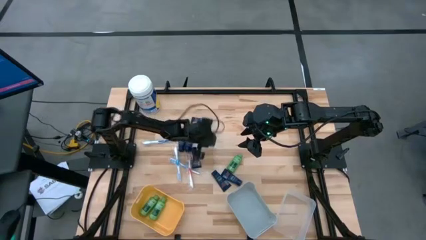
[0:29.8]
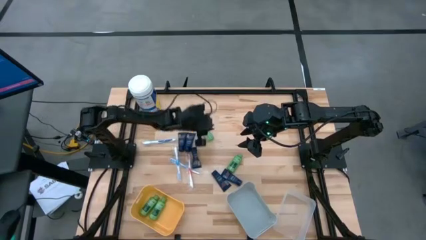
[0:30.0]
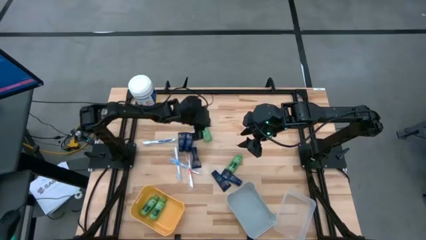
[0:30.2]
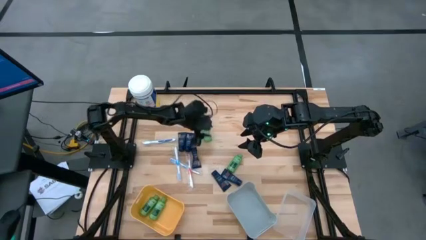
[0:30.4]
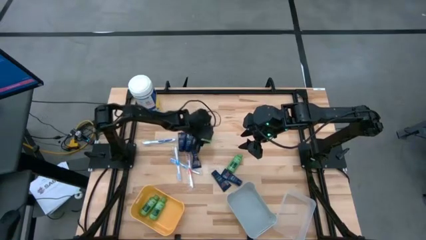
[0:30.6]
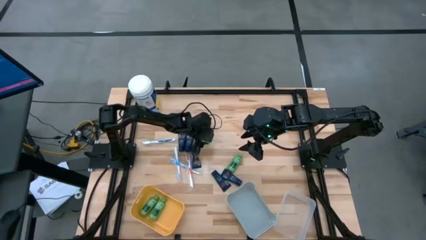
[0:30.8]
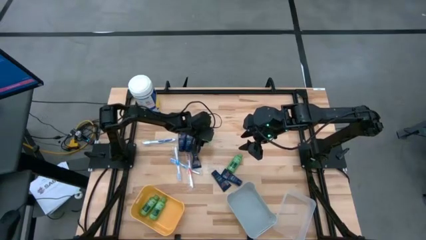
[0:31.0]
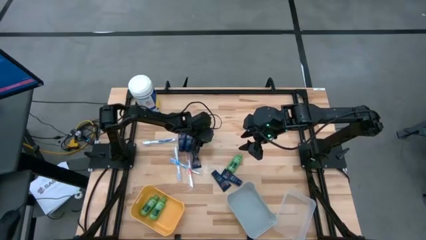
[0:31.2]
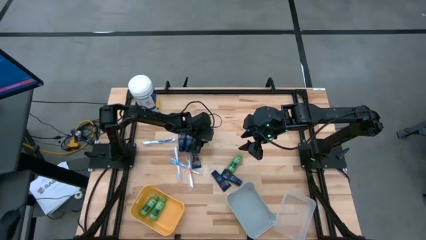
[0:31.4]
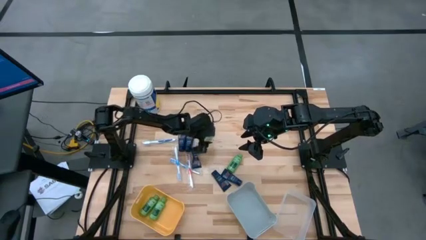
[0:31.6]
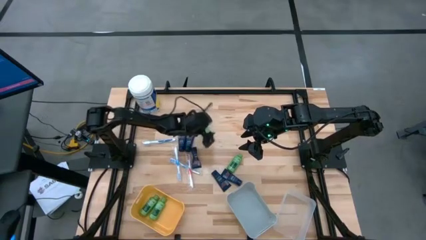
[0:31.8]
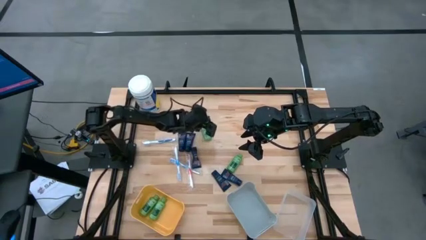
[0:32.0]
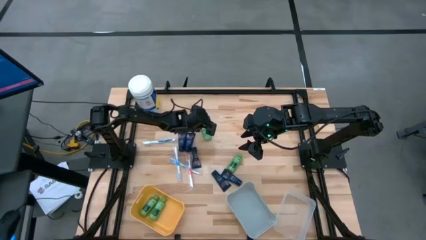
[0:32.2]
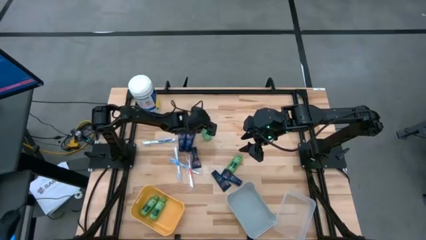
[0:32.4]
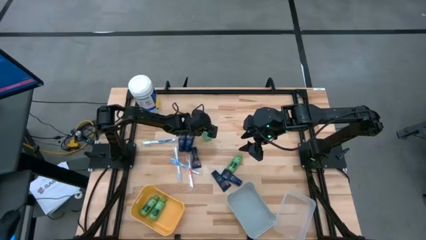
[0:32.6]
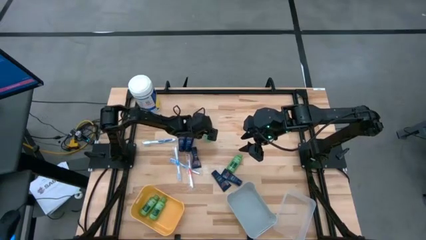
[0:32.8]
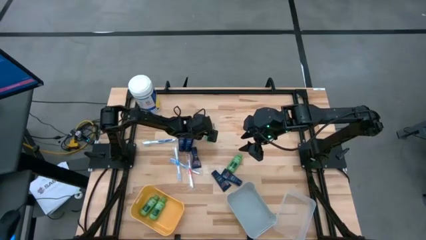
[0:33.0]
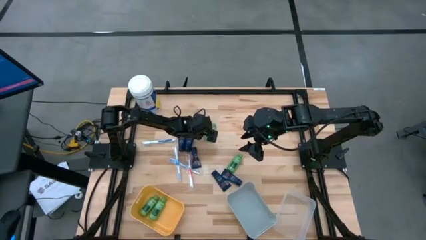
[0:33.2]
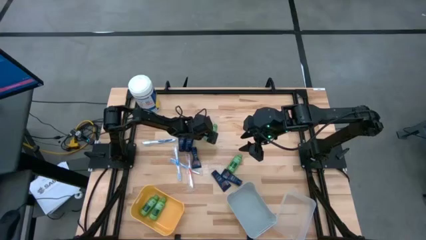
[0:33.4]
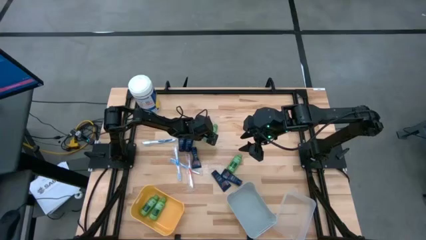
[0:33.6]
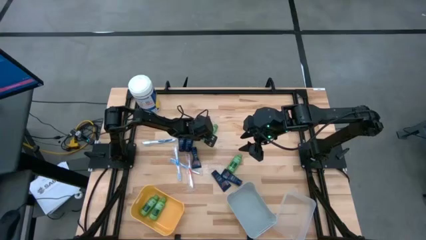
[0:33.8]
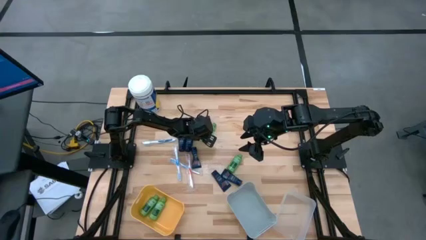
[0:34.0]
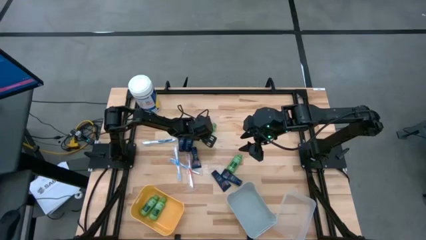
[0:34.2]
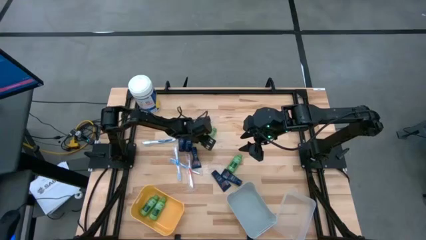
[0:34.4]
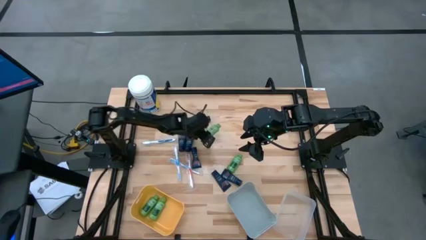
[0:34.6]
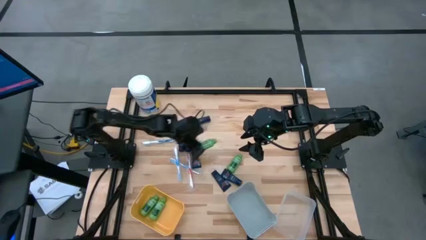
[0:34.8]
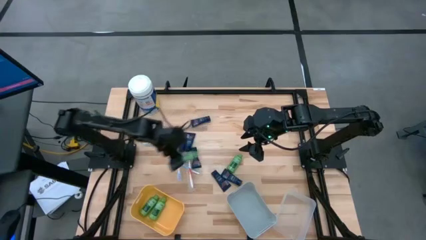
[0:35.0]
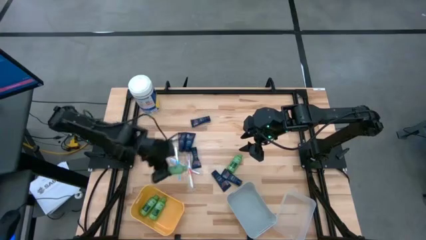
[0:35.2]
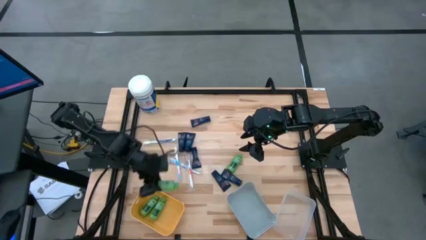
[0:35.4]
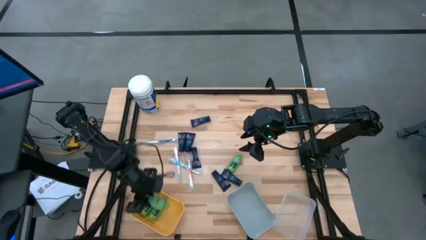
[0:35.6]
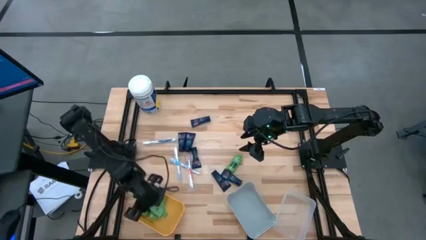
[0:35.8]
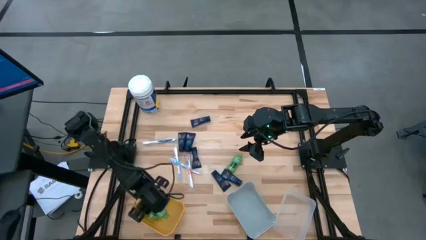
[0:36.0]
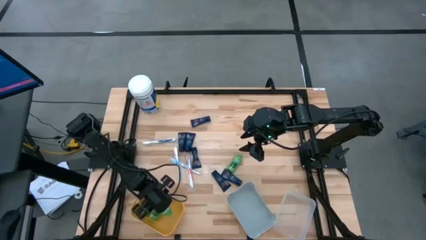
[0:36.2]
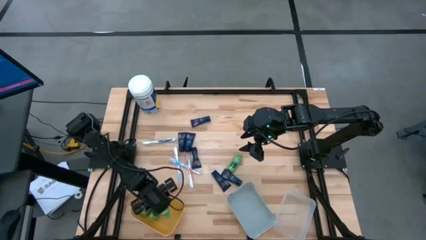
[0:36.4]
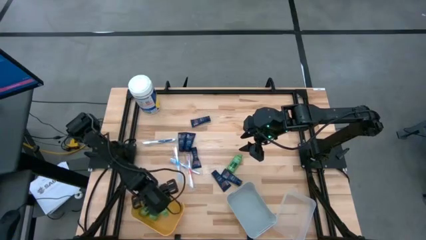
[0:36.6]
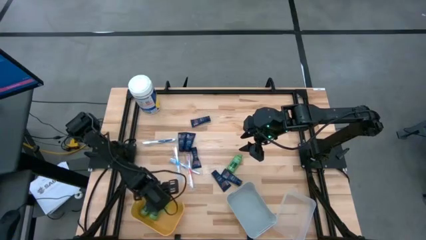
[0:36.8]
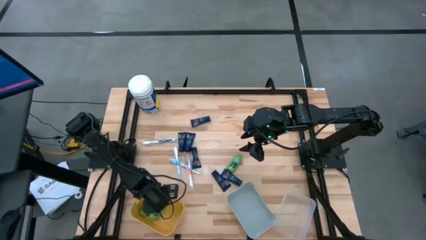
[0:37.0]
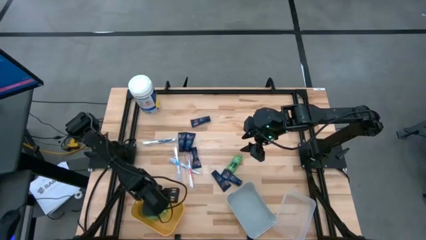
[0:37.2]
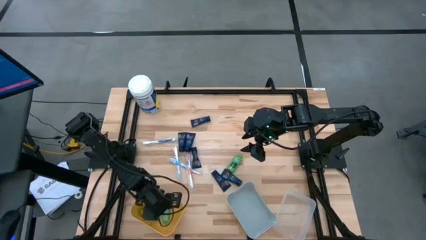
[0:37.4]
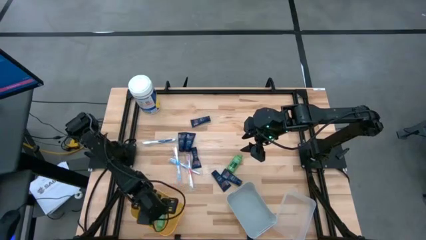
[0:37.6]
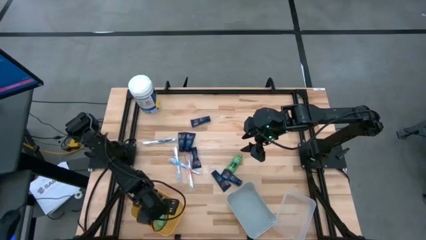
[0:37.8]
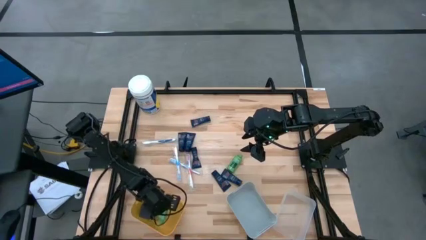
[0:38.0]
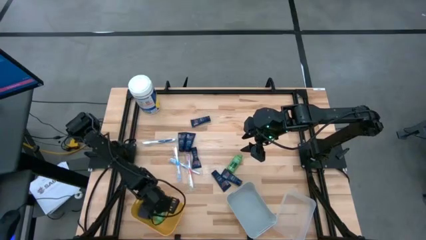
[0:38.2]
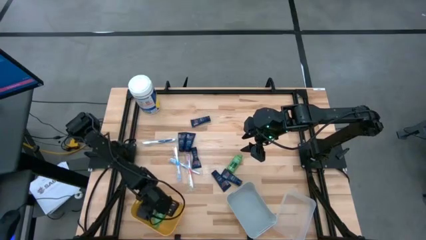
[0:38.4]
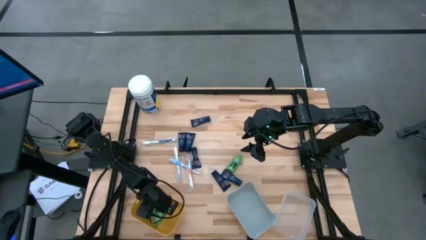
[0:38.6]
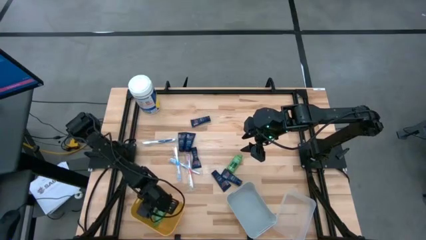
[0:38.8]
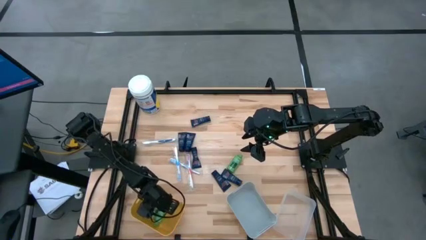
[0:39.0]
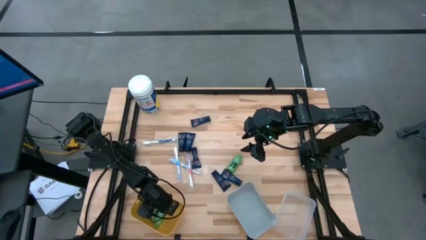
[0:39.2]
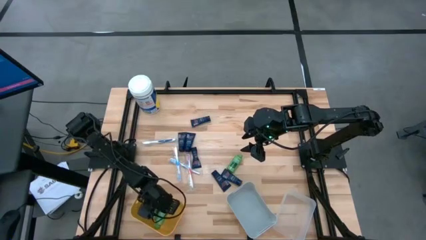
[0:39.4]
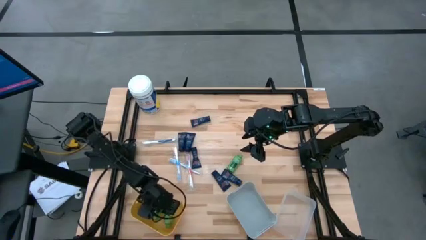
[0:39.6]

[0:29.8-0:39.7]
Task: Pick & Place Travel size toiletries
Put the green shampoo into the yellow bin

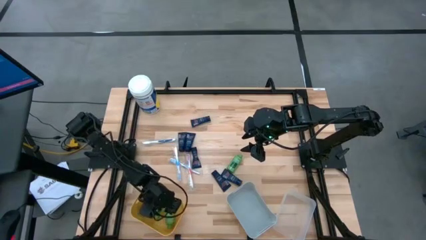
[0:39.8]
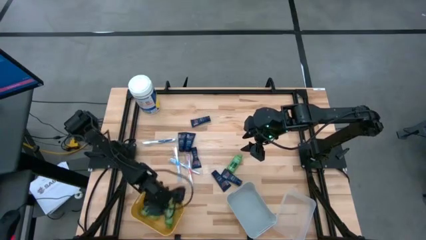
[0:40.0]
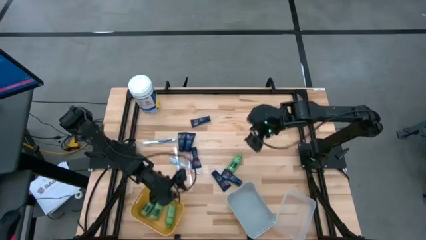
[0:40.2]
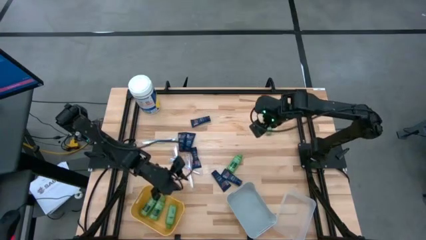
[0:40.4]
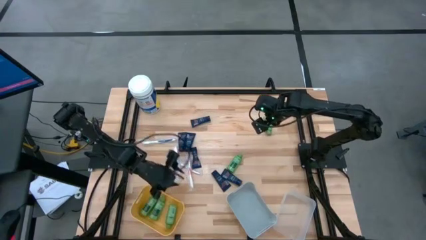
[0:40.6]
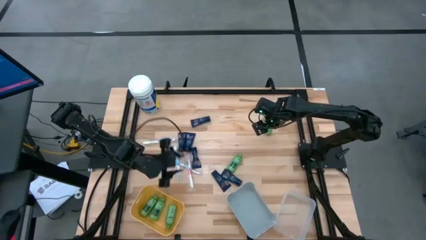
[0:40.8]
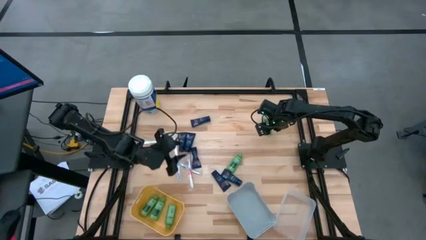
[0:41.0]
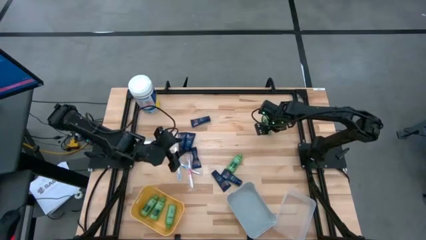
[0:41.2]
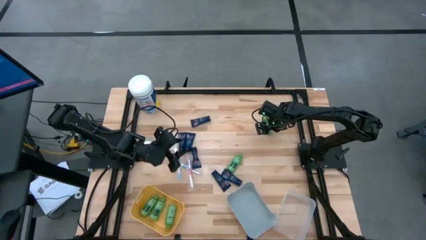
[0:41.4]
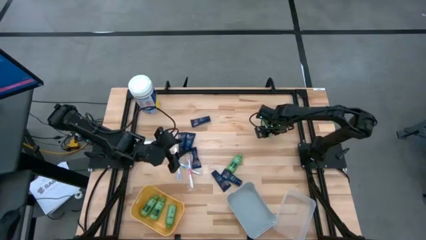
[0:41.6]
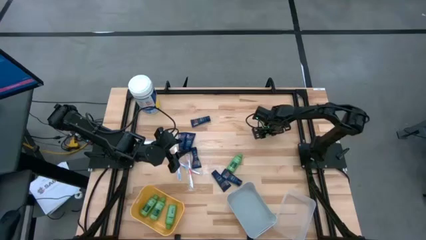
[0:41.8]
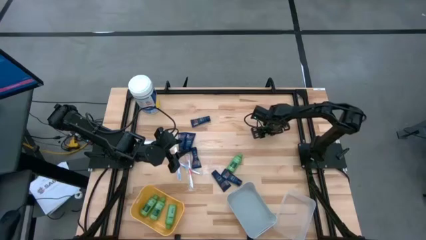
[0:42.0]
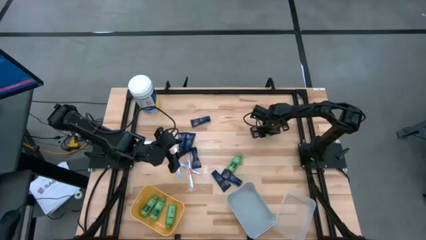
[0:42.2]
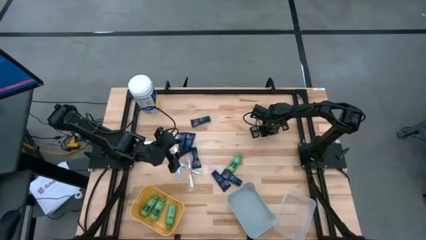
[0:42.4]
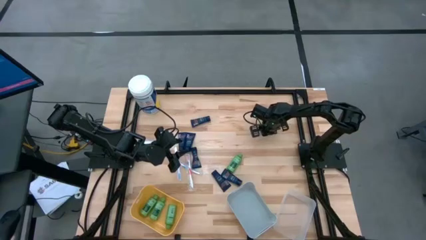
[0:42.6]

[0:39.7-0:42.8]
Put the green shampoo into the yellow bin

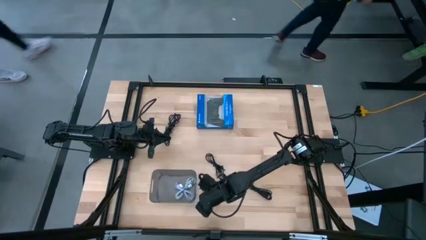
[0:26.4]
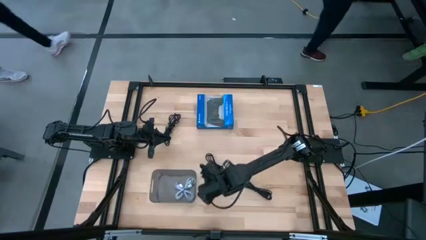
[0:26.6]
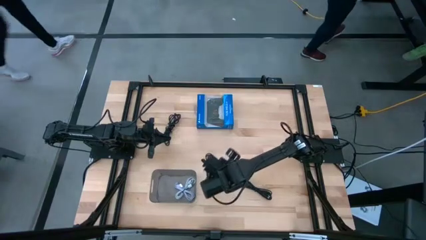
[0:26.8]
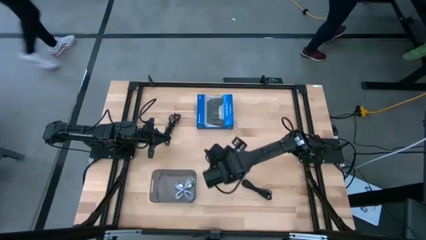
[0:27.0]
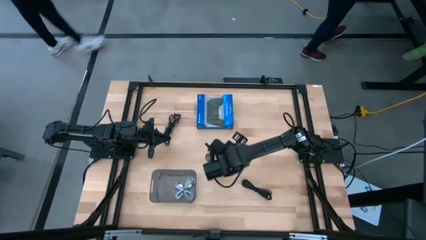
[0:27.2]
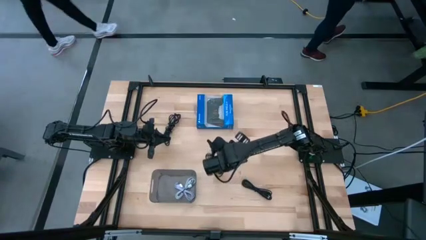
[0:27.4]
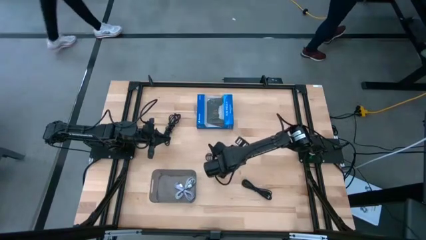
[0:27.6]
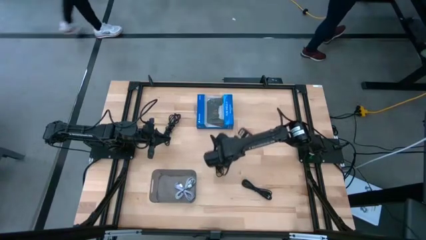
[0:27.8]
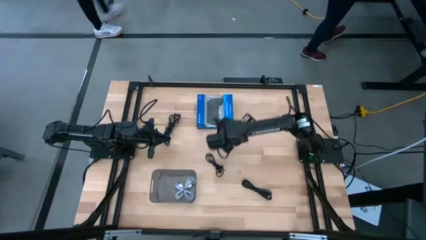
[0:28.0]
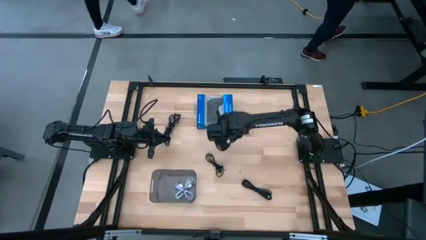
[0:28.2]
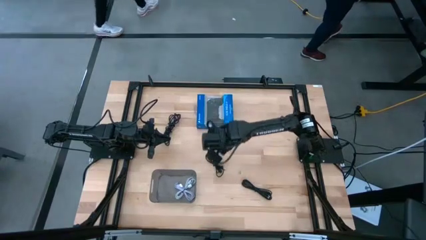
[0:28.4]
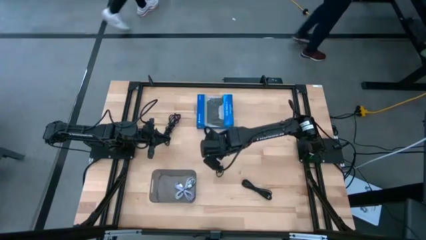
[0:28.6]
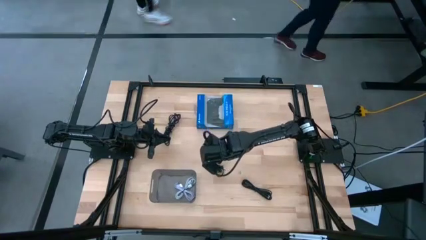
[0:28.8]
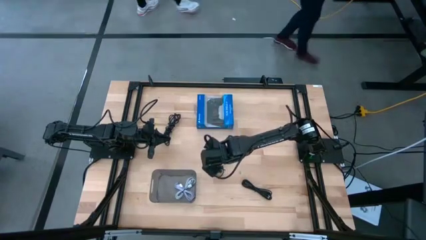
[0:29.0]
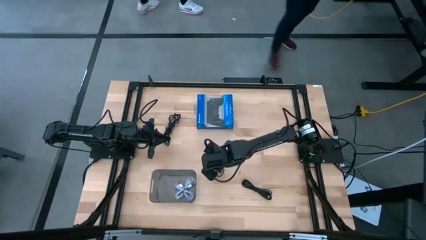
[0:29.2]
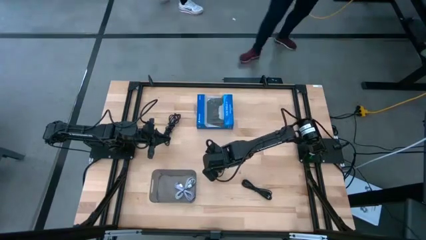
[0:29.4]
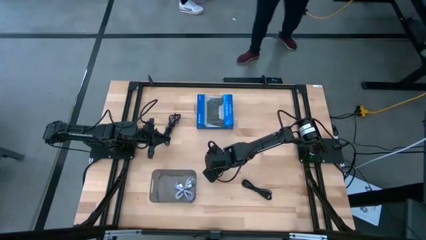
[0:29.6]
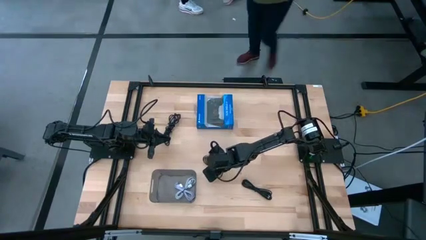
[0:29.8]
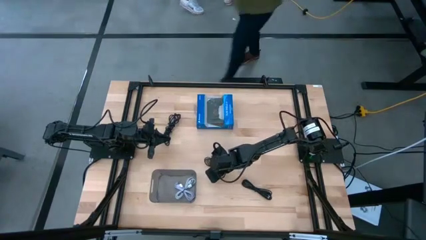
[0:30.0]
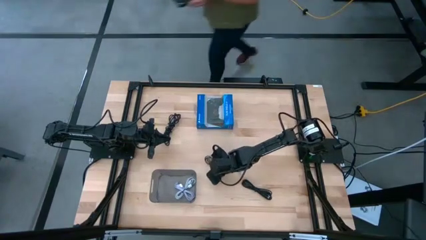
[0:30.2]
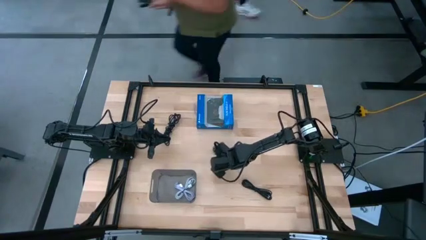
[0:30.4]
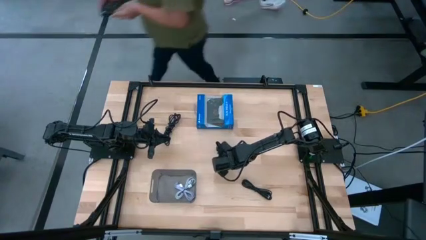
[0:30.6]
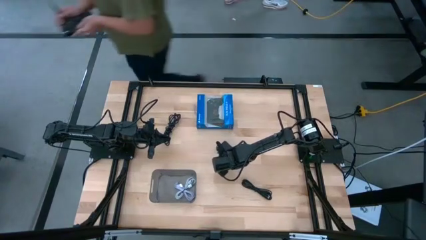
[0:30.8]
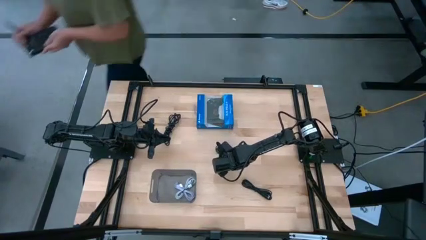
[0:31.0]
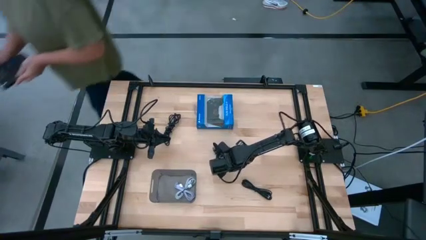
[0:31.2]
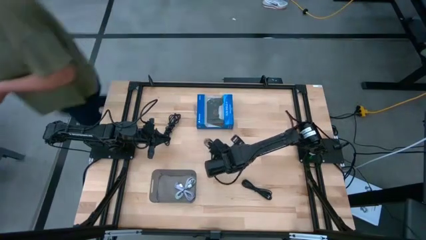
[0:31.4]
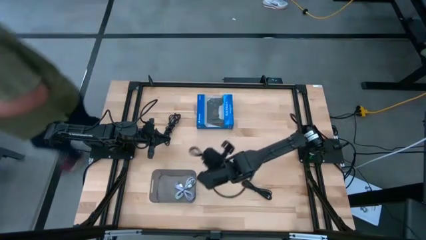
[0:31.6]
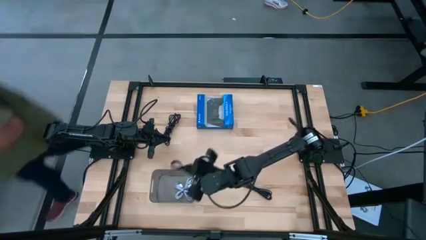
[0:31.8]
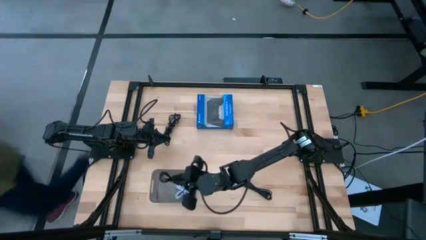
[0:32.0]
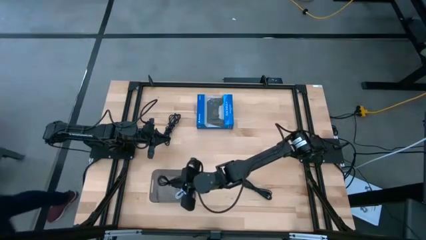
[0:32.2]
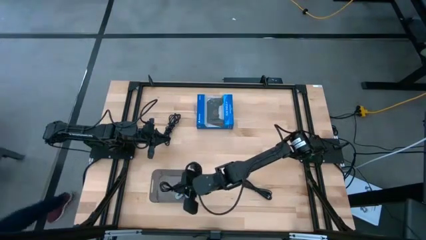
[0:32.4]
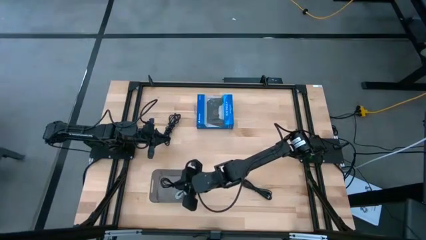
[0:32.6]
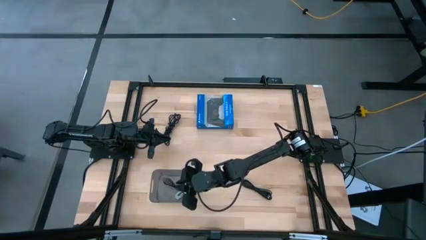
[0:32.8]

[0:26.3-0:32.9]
Task: Pick and place USB-C Cables
Put the center black charger cable into the black bin
